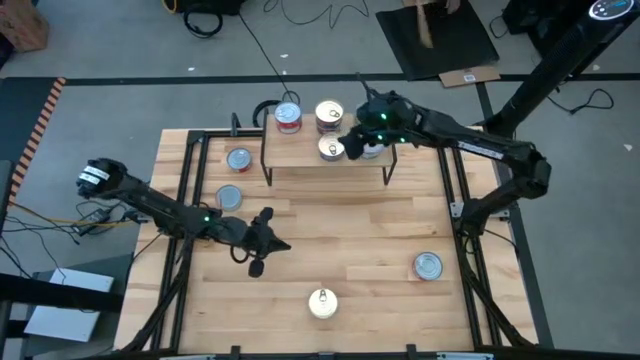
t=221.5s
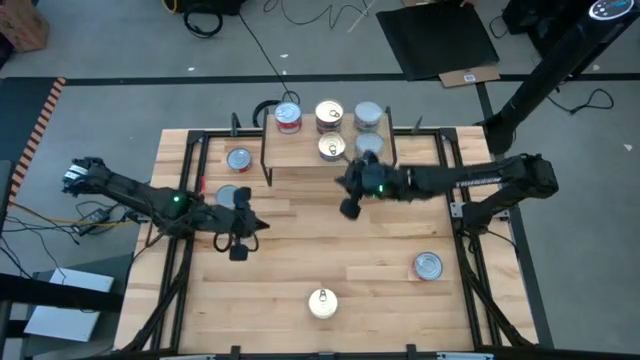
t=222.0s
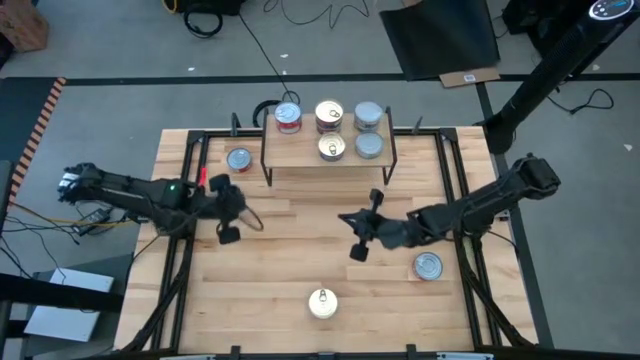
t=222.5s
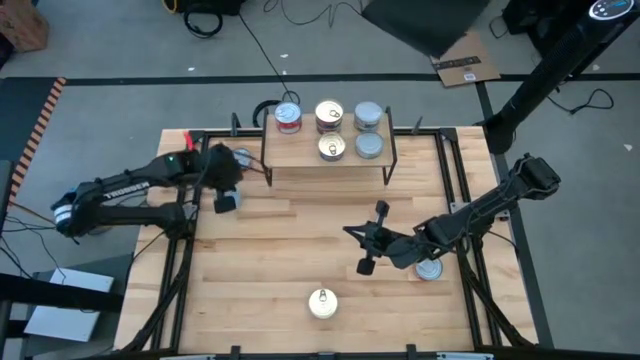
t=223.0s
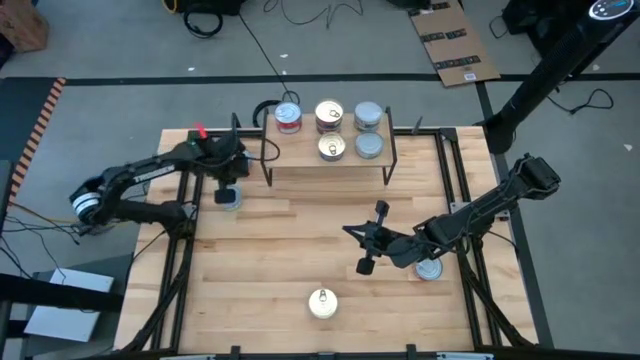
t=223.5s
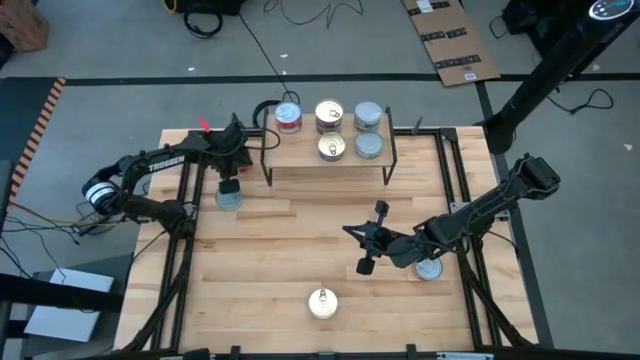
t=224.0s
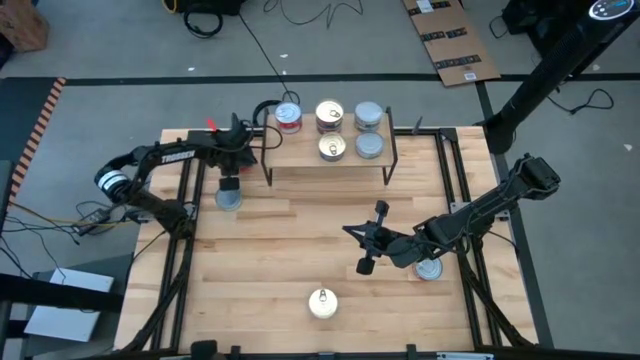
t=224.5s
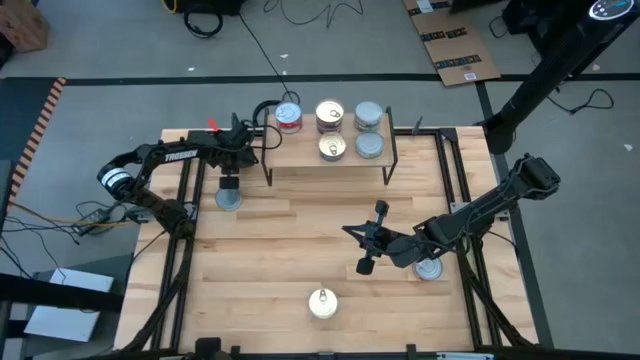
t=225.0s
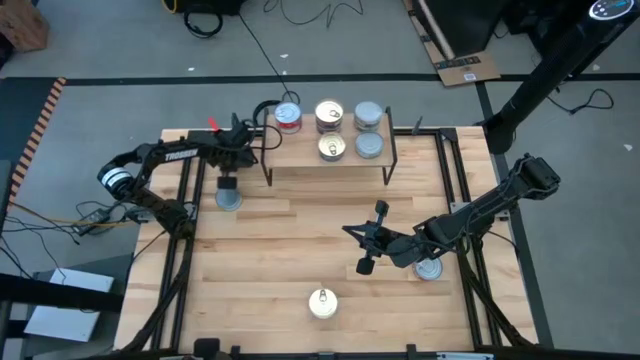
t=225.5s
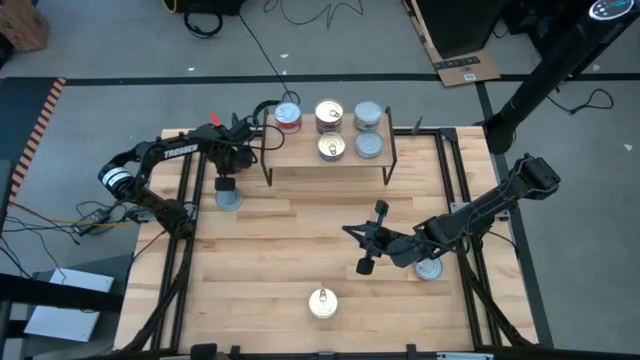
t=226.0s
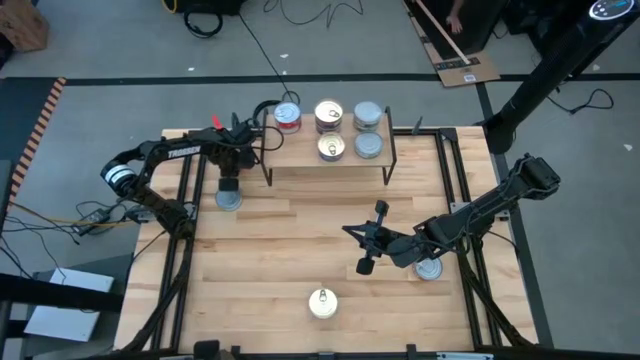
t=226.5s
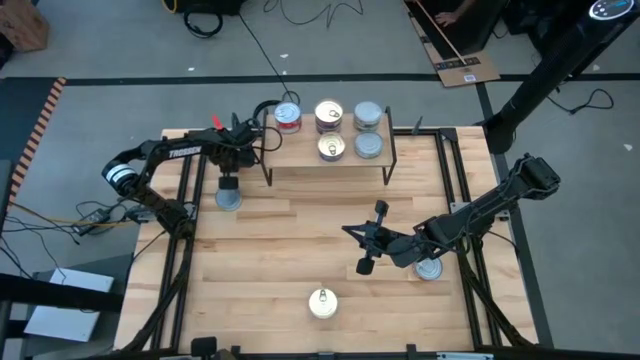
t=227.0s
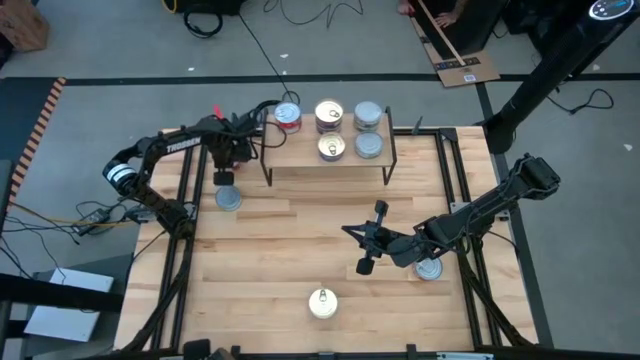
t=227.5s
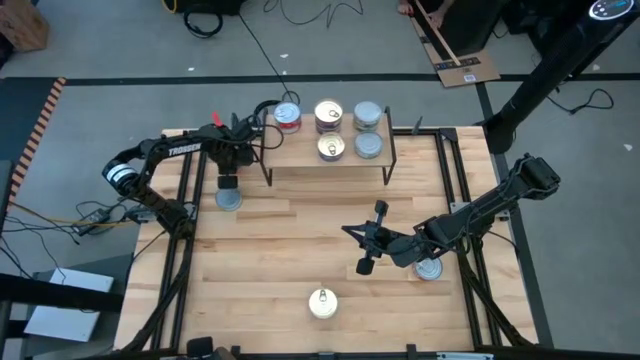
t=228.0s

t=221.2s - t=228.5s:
Task: Stack canned seafood by type on shelf
Put the red tuna can on the shelf aligned with the other red tuna can

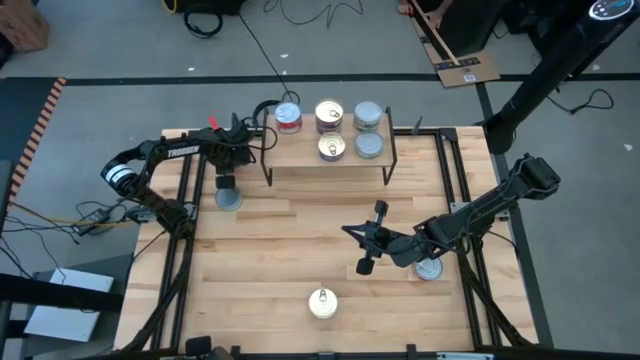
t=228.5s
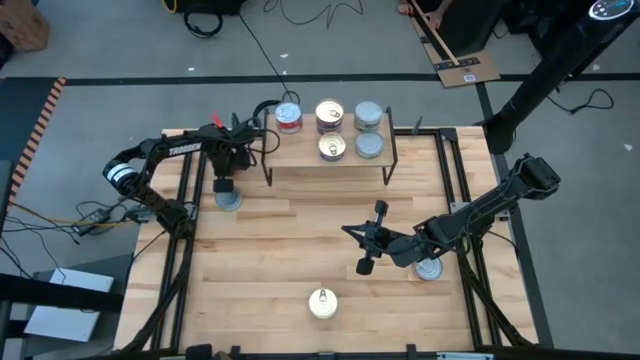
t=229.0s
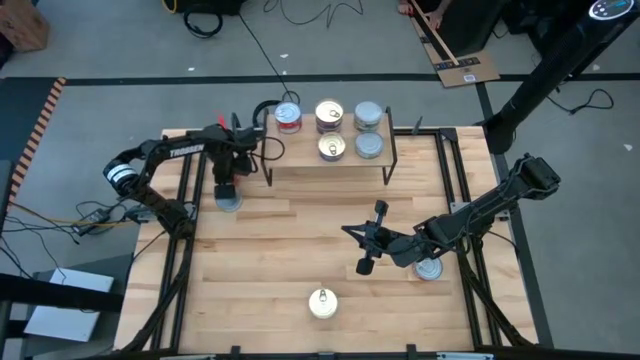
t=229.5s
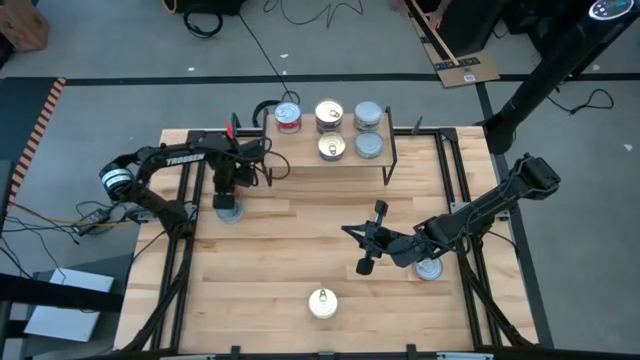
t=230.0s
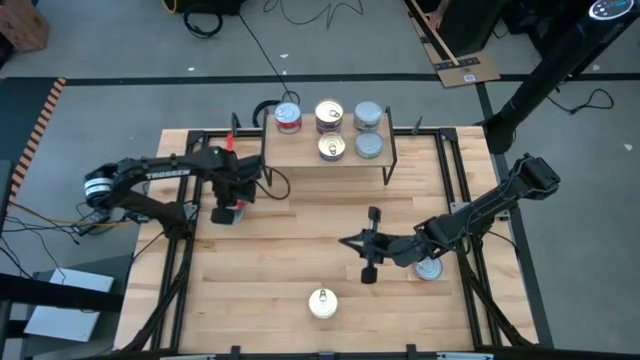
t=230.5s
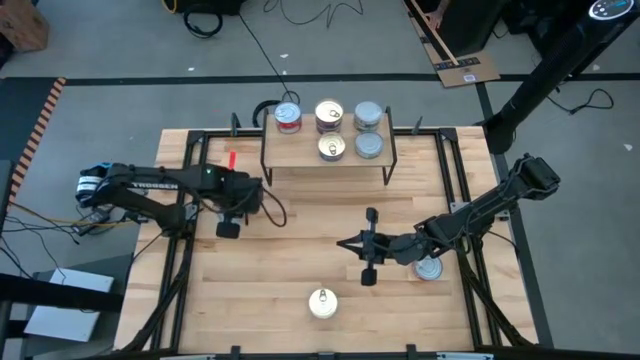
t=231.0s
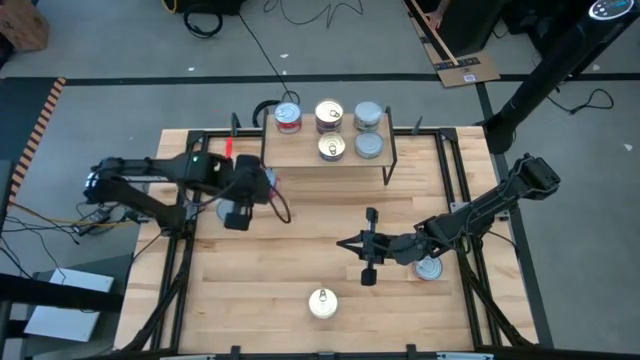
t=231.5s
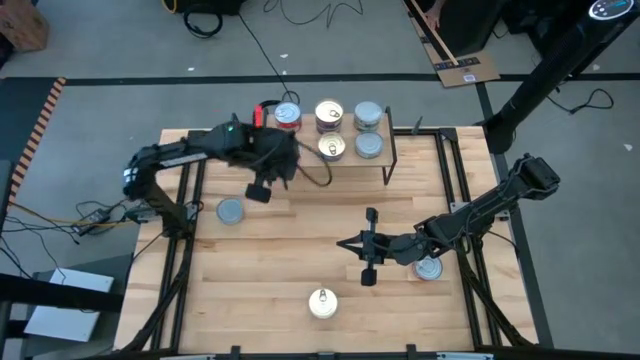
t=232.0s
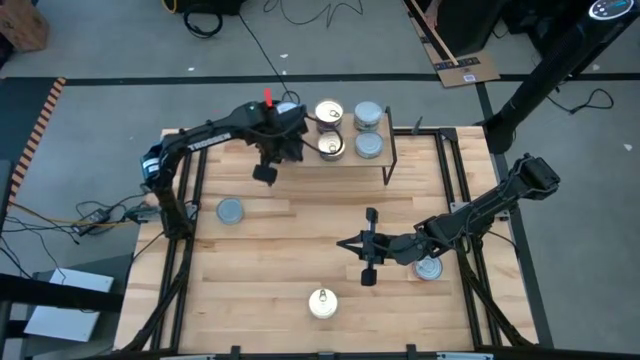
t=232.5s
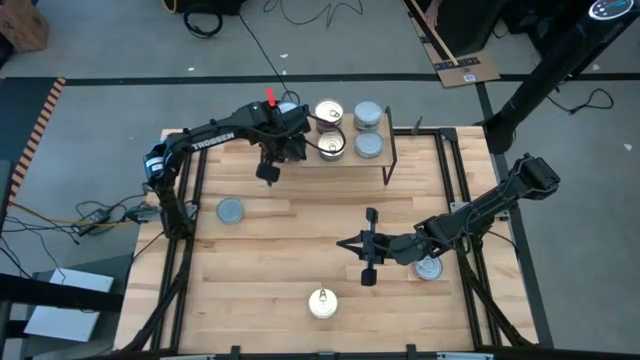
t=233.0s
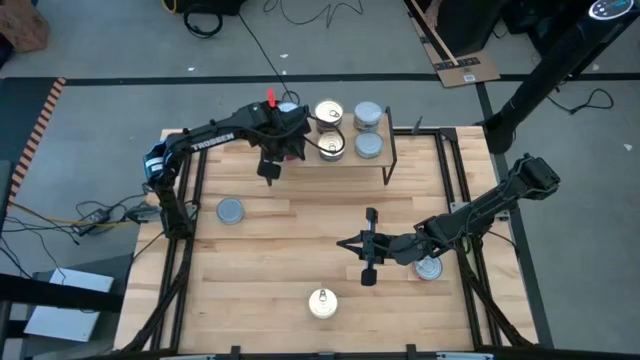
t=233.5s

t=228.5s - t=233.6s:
Put the red tuna can on the shelf aligned with the other red tuna can

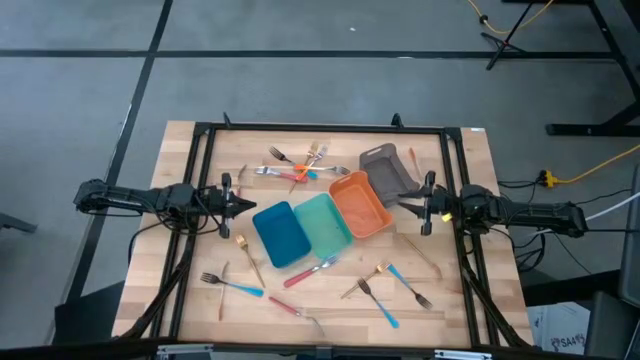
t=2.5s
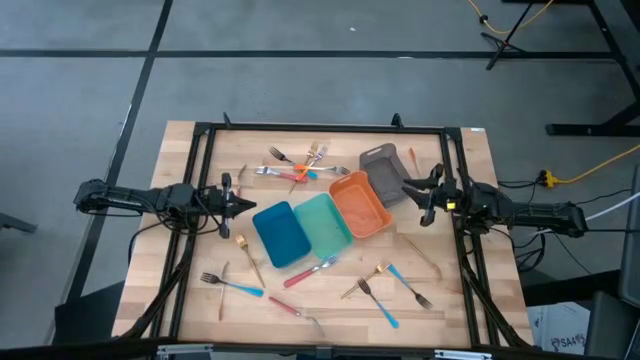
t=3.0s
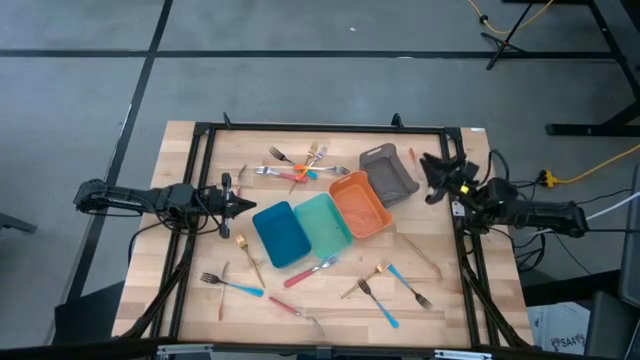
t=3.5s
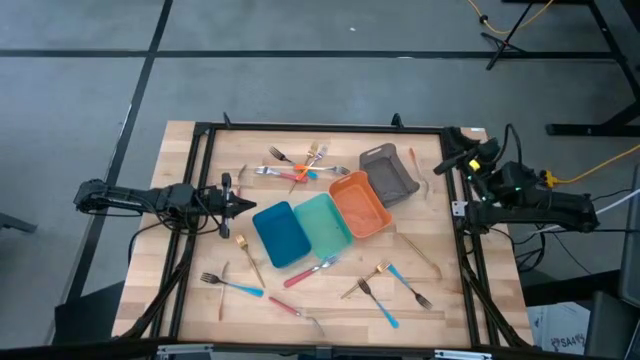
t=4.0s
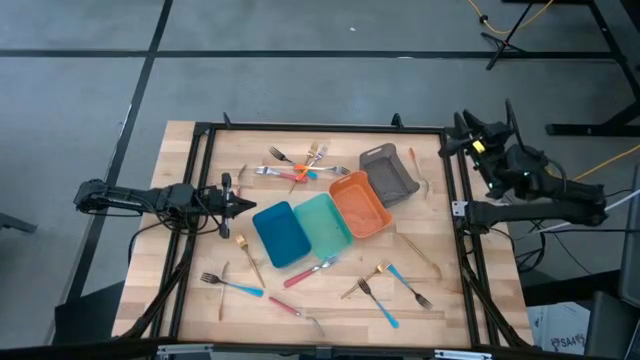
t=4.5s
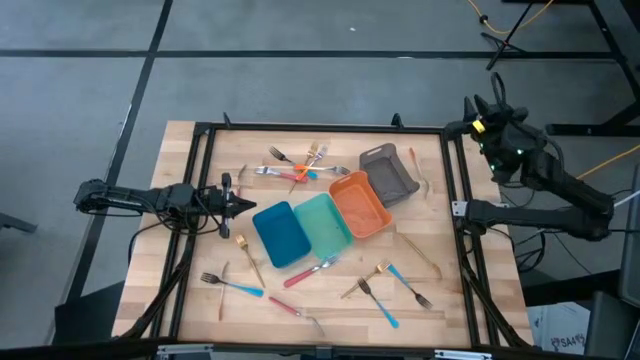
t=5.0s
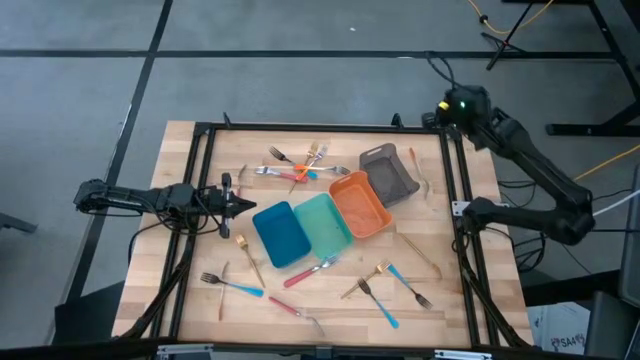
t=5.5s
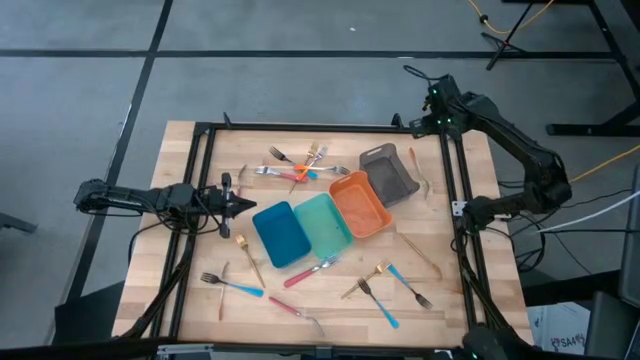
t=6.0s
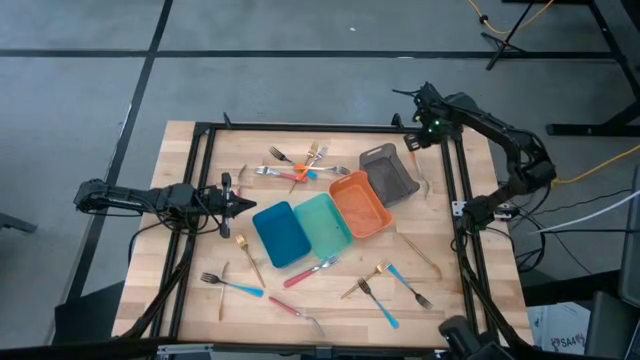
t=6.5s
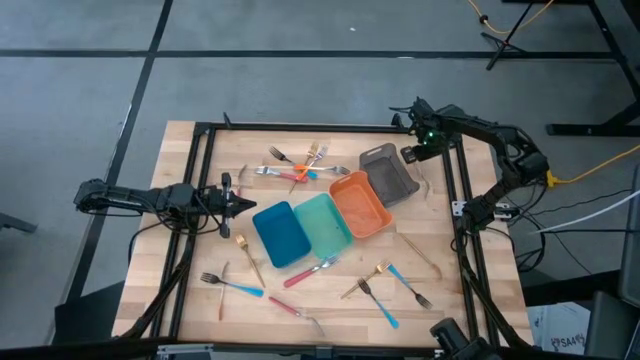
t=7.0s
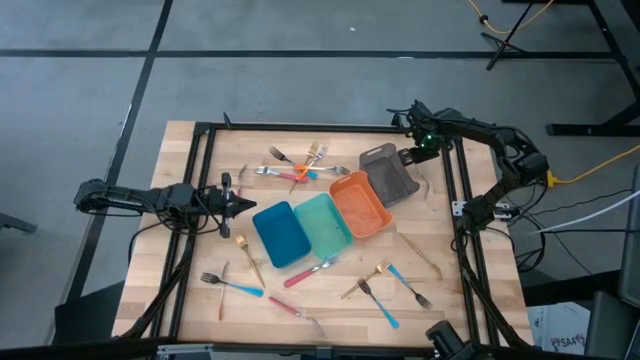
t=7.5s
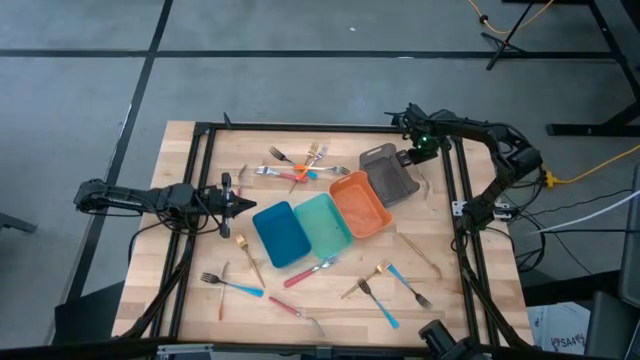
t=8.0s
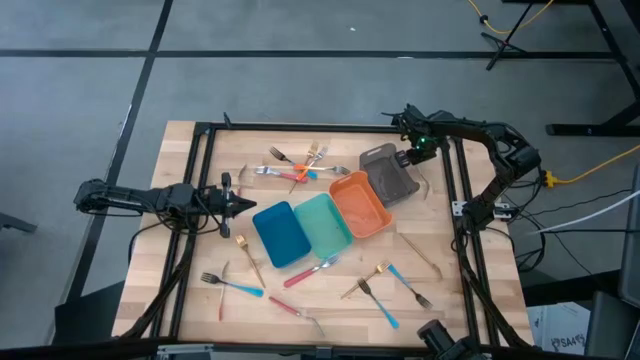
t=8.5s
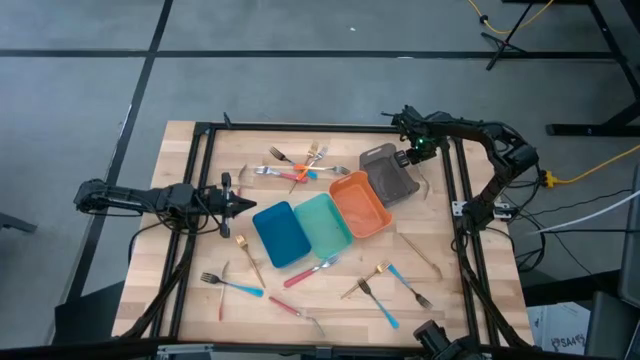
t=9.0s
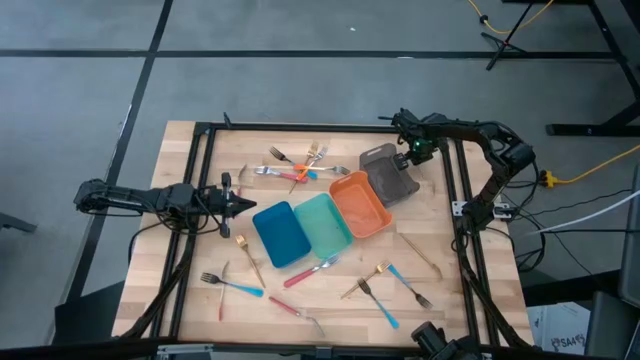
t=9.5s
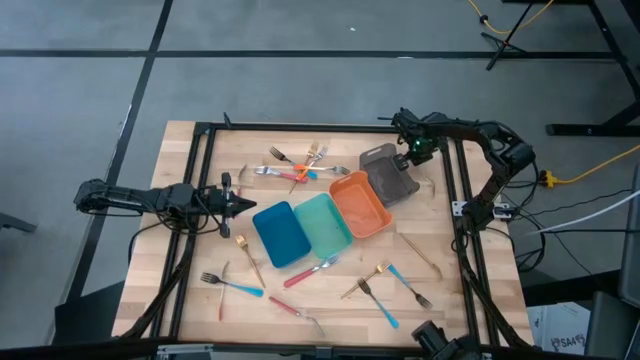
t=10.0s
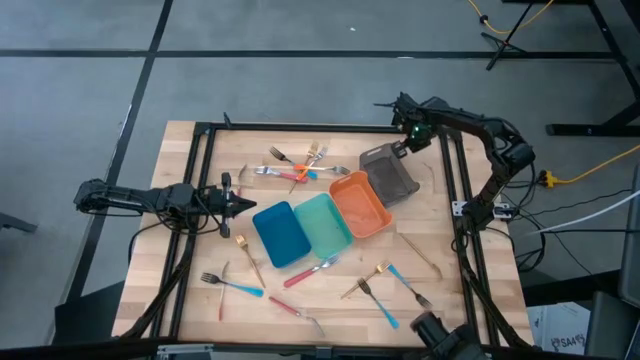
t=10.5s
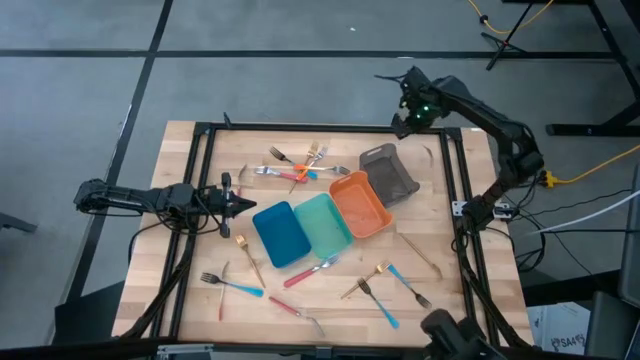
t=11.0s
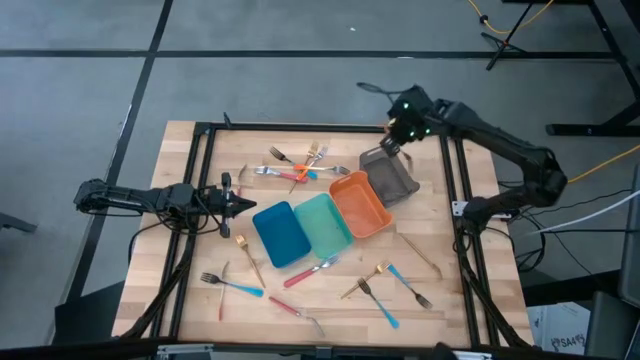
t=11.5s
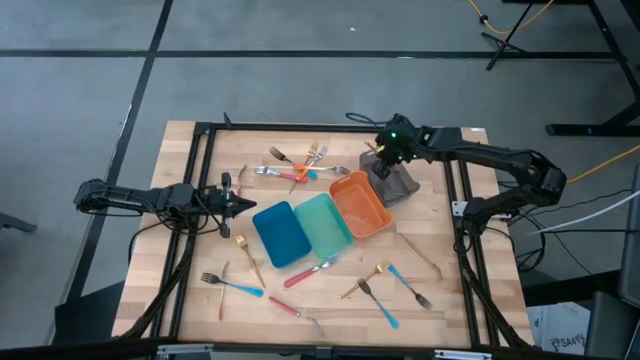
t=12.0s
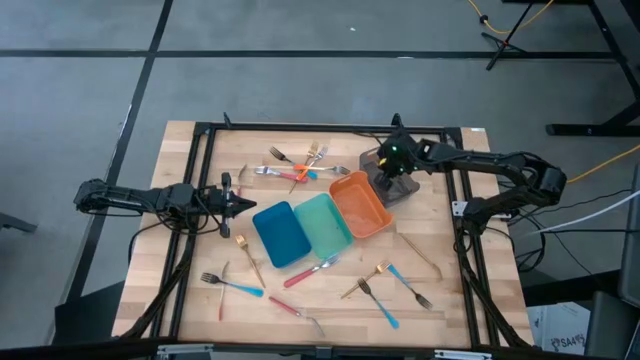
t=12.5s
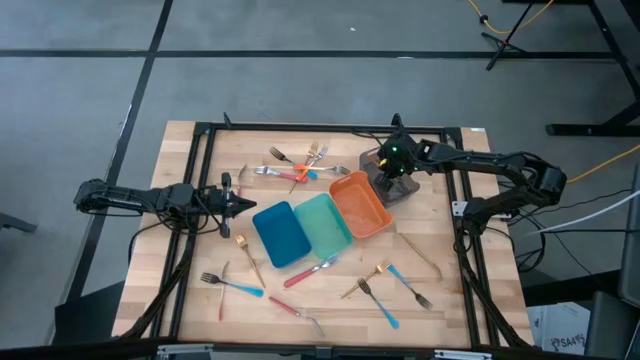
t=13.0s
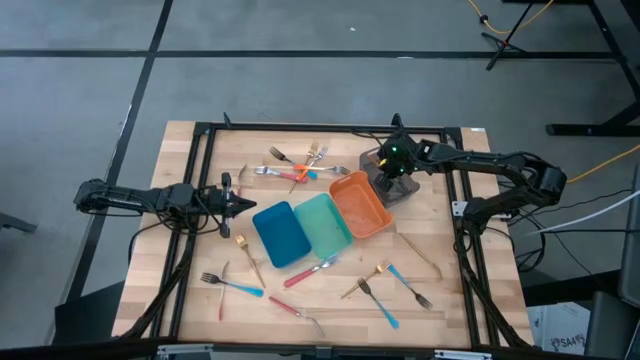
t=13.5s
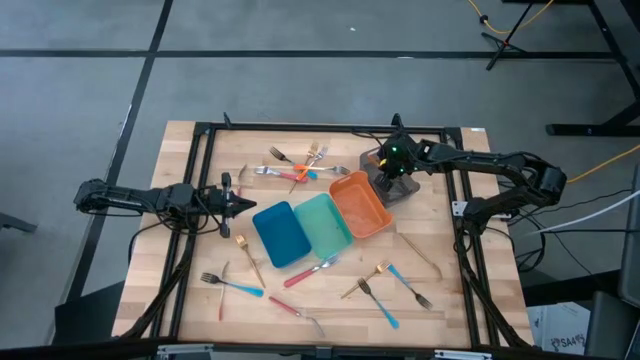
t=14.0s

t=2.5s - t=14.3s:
Task: Sort silverware by color (type)
Put the orange fork into the black bin
